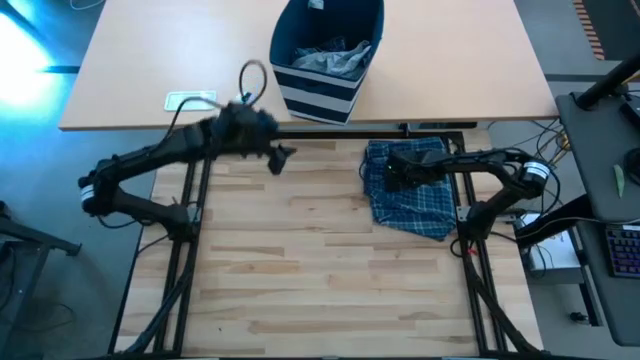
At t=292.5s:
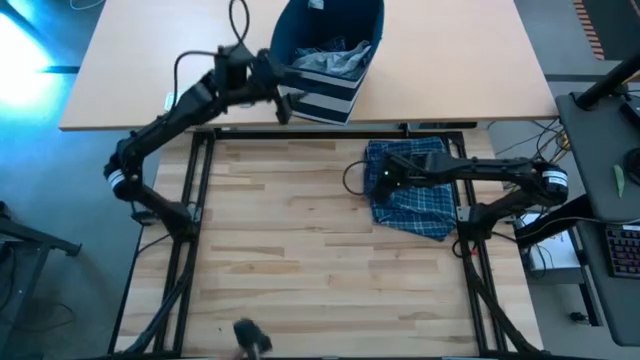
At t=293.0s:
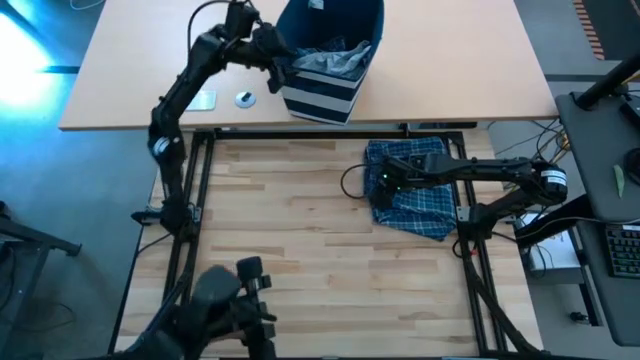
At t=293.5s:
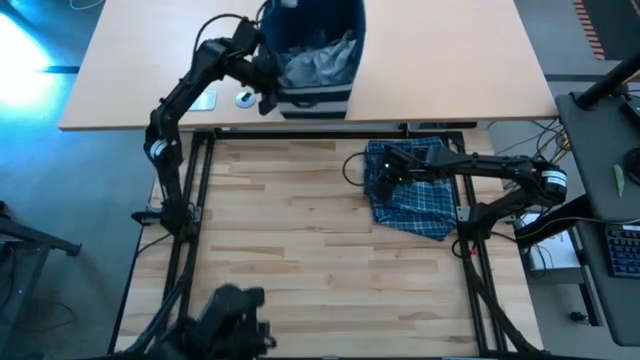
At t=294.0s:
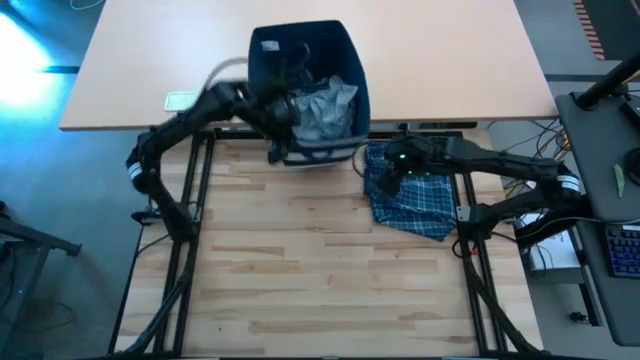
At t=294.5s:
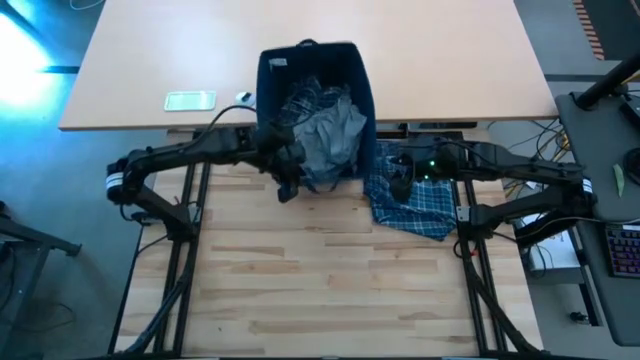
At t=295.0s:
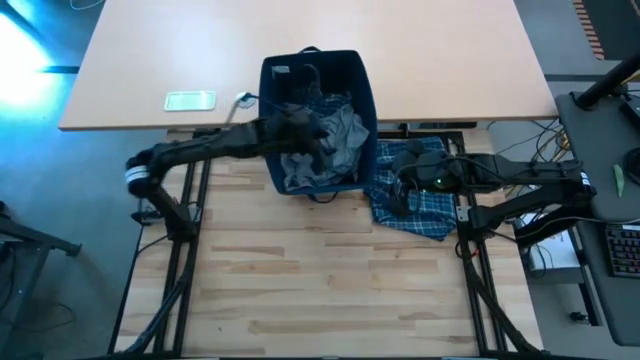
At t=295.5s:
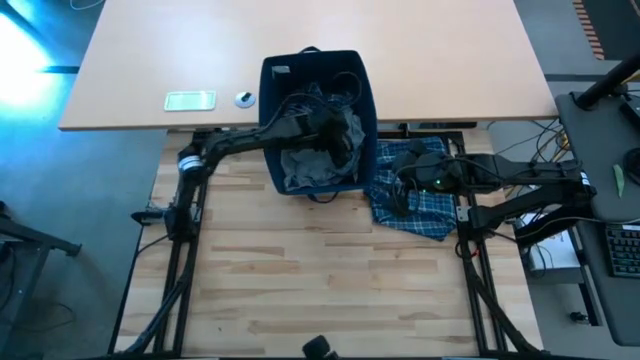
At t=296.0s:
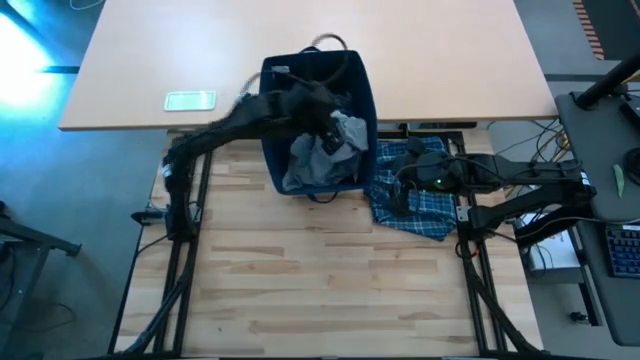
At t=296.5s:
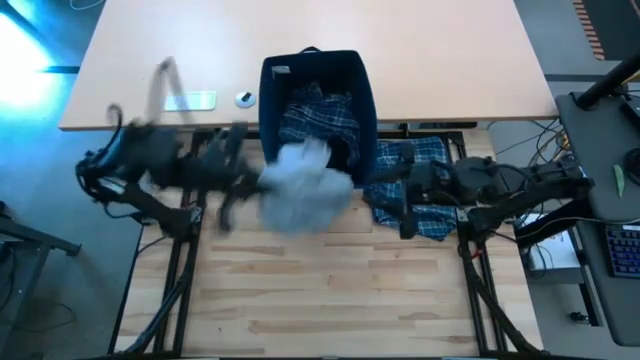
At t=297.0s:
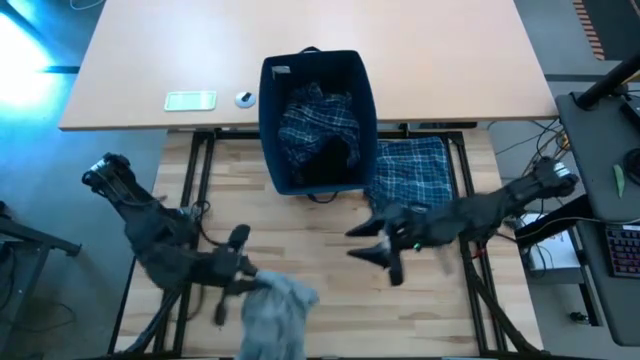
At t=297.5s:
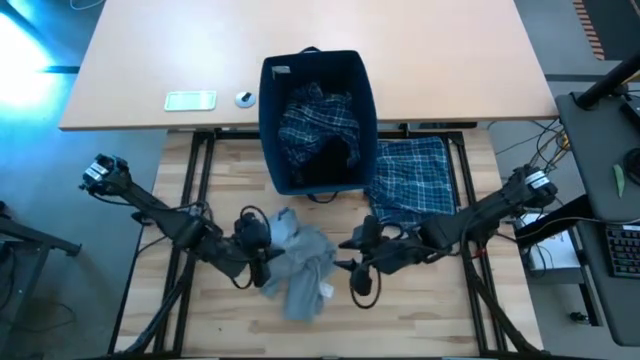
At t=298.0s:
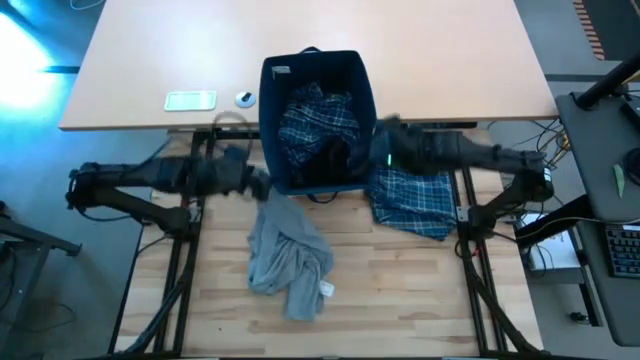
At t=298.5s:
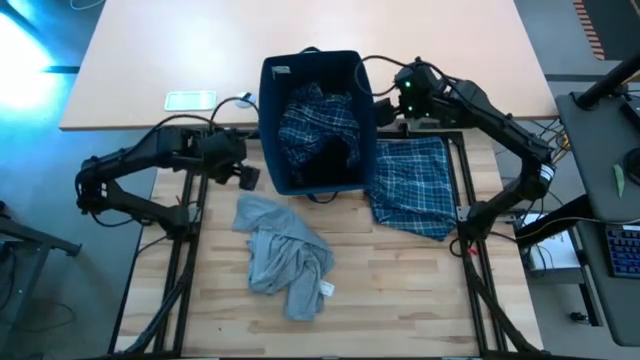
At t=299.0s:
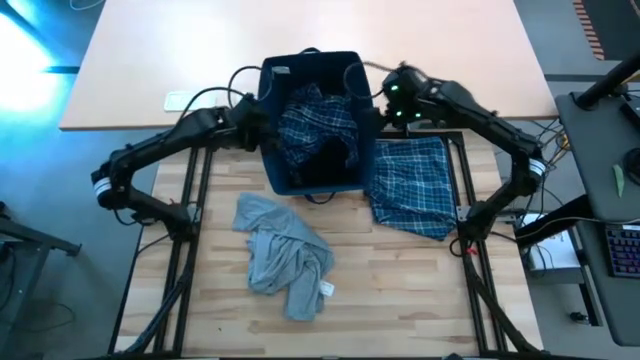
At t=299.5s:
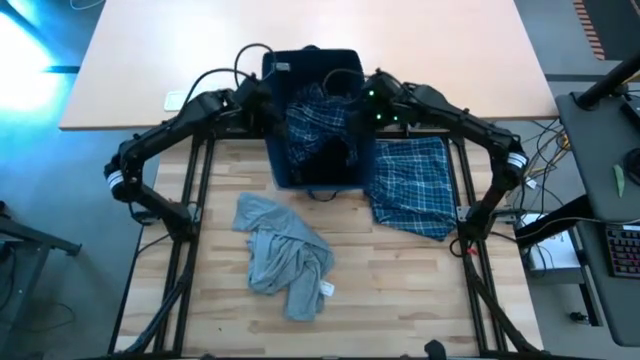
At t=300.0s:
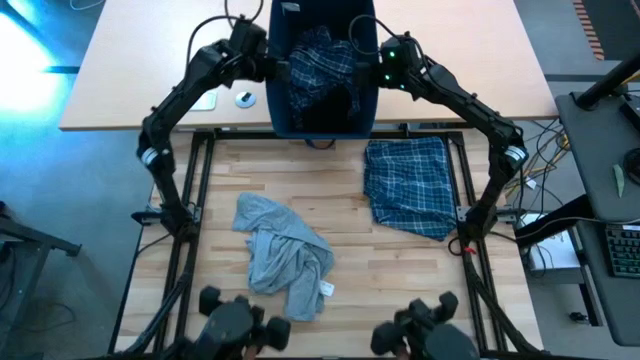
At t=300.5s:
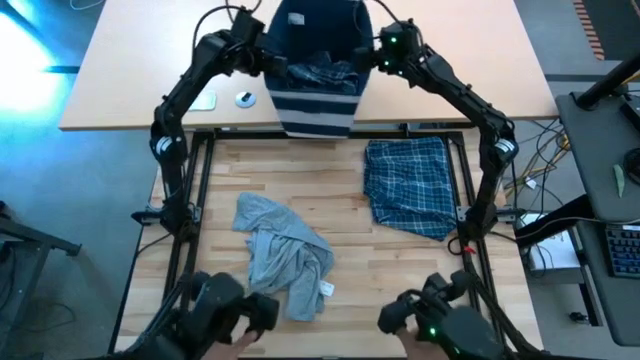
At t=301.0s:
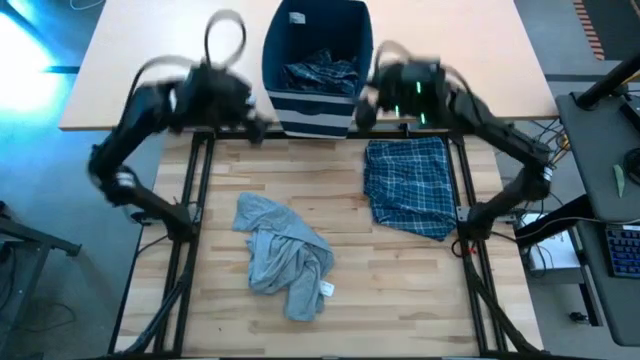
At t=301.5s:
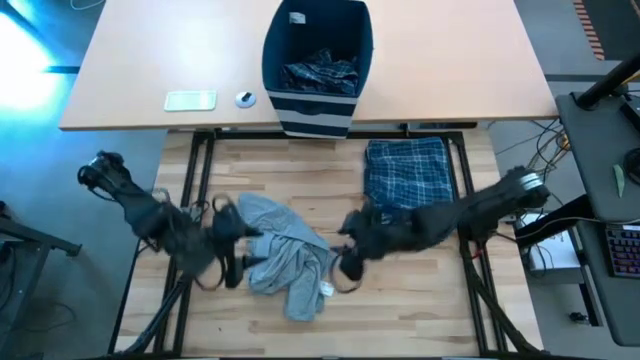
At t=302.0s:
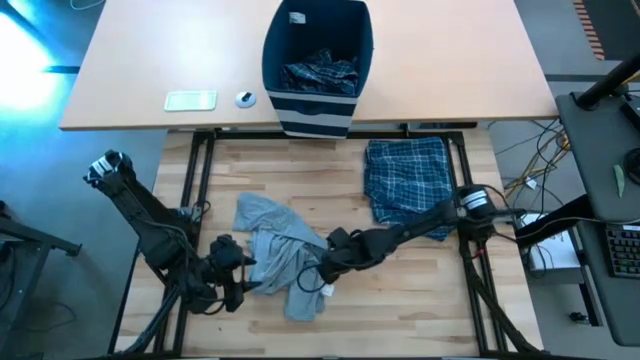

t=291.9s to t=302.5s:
Task: Fold Laundry from Bin
Remove the gray shirt from the blue laundry bin

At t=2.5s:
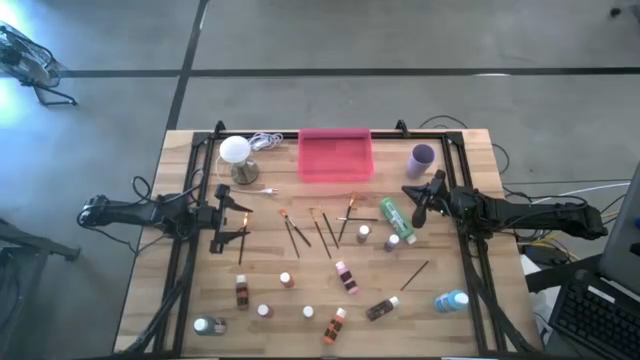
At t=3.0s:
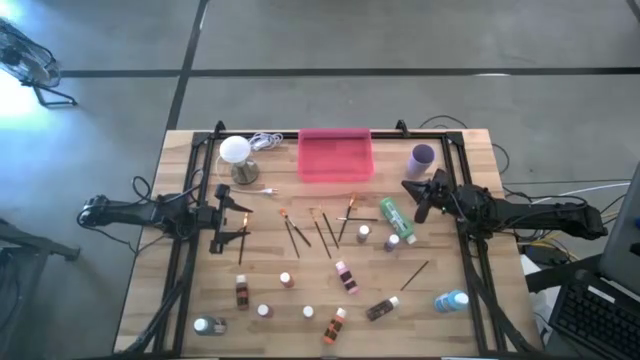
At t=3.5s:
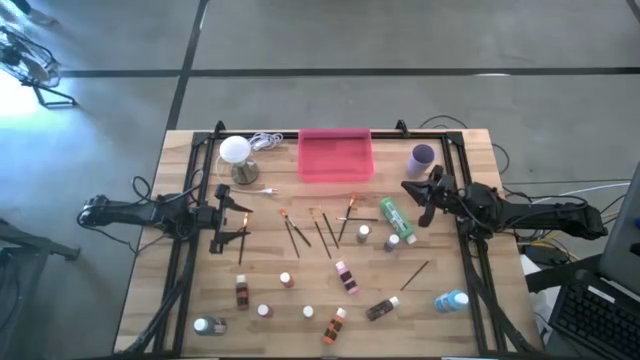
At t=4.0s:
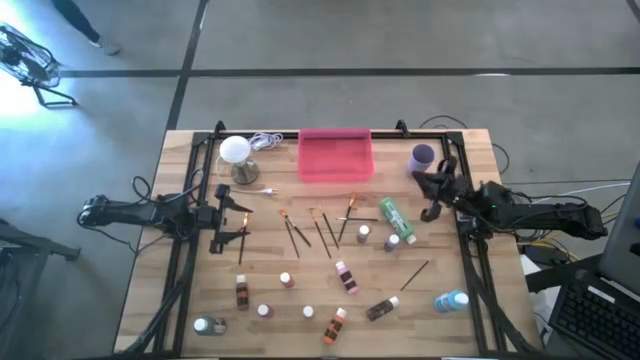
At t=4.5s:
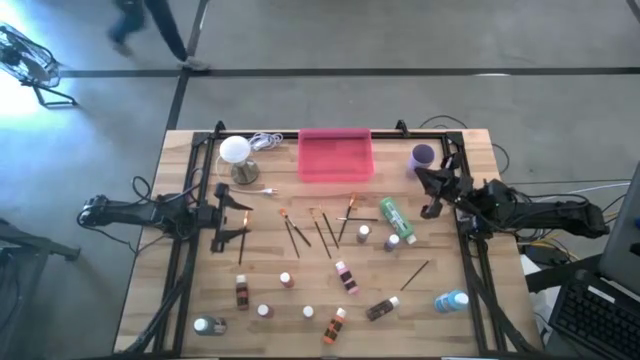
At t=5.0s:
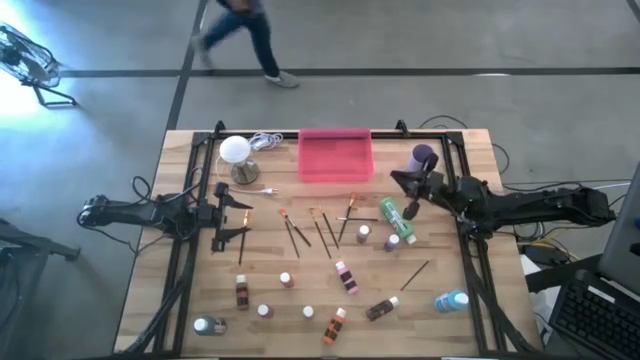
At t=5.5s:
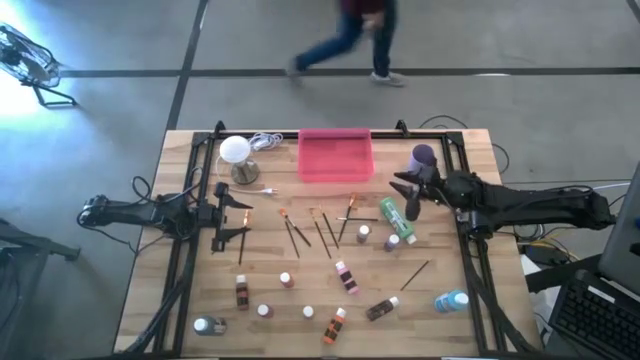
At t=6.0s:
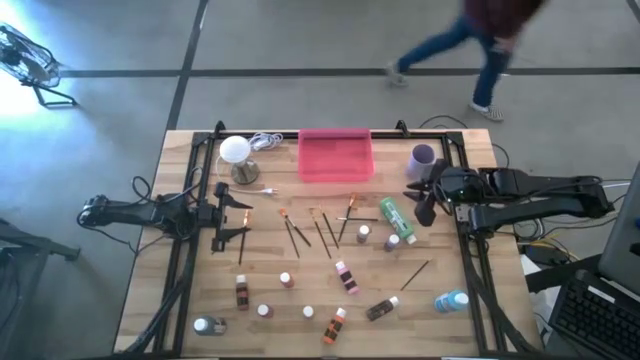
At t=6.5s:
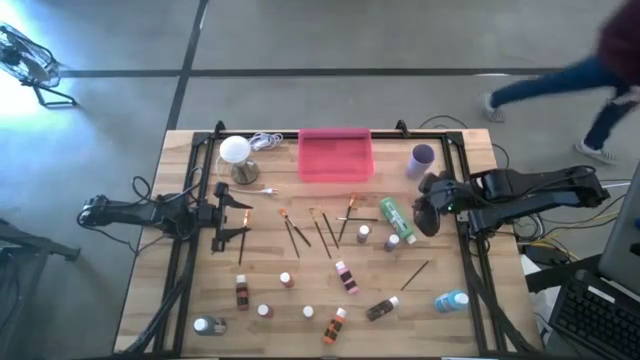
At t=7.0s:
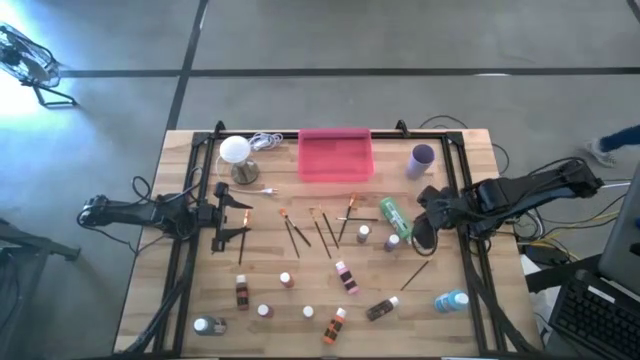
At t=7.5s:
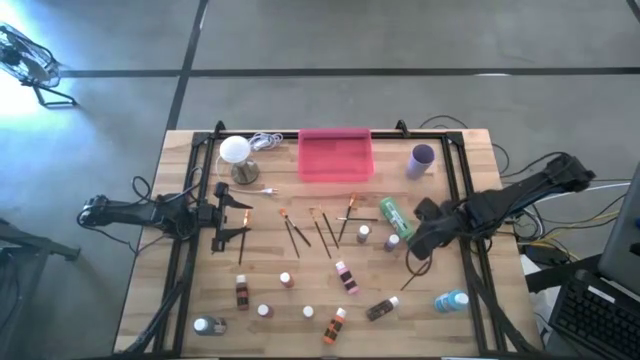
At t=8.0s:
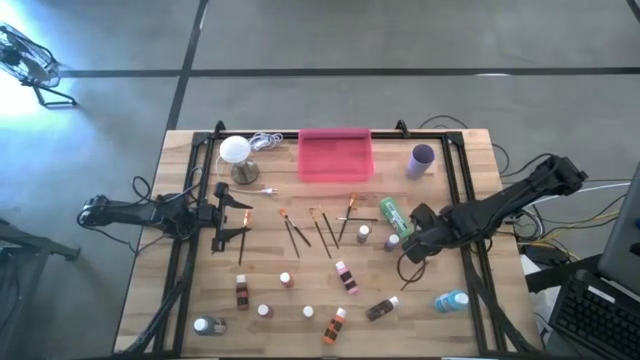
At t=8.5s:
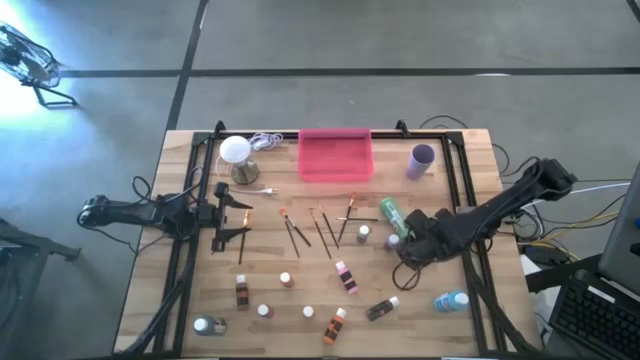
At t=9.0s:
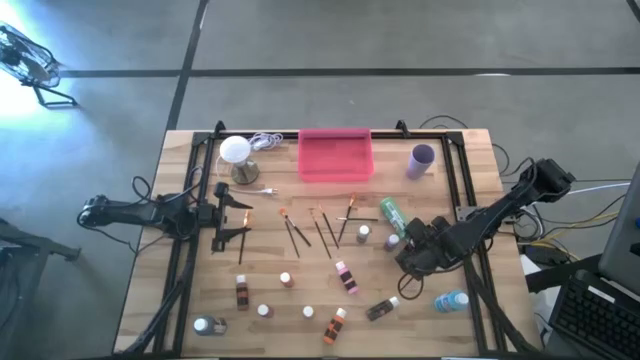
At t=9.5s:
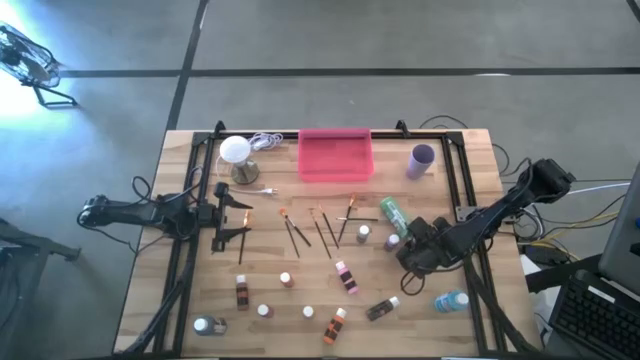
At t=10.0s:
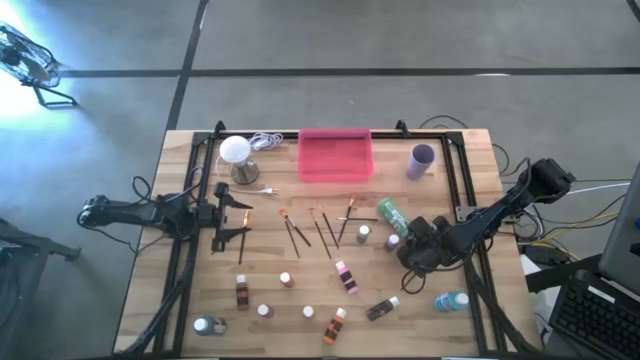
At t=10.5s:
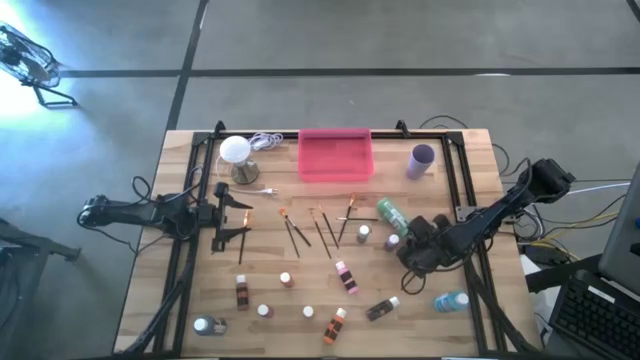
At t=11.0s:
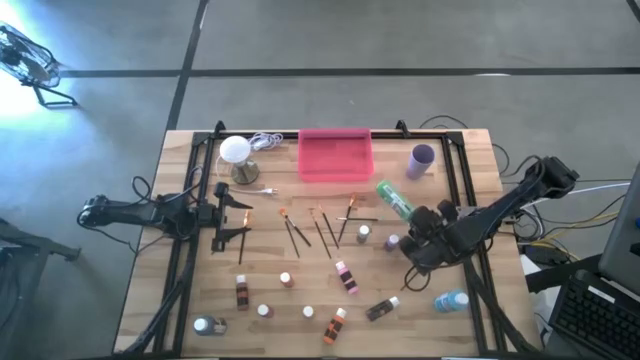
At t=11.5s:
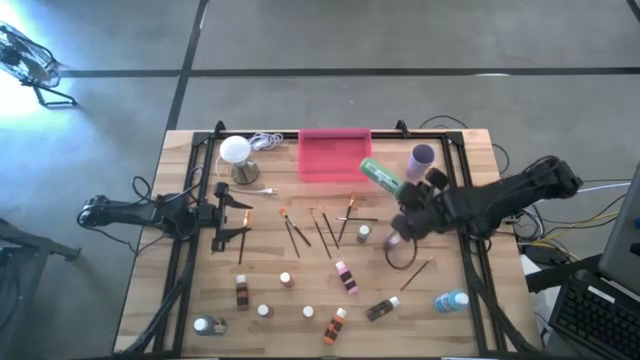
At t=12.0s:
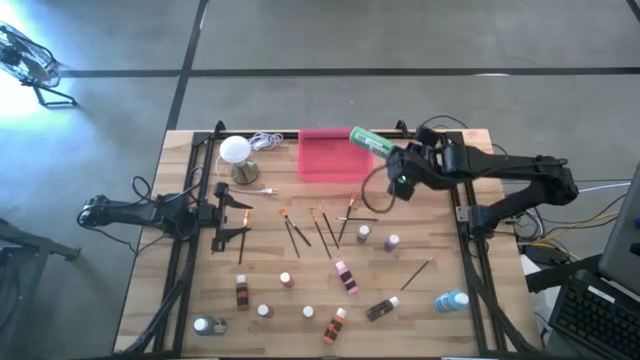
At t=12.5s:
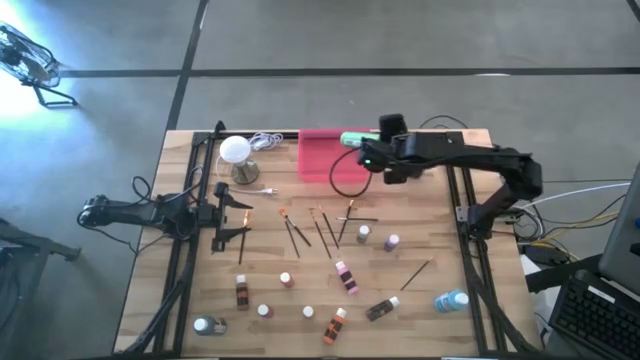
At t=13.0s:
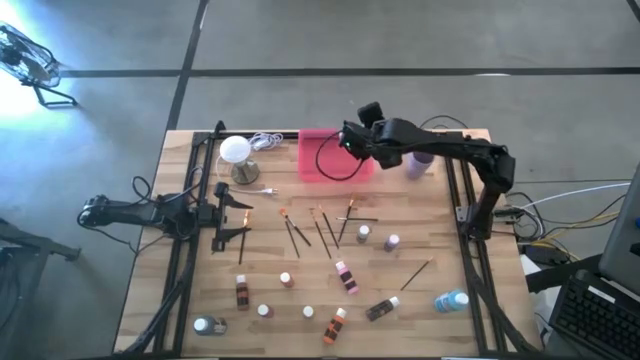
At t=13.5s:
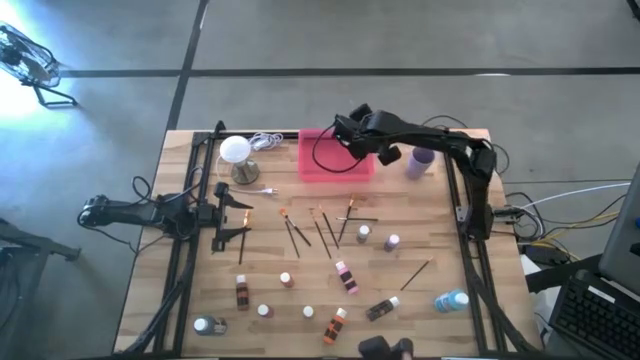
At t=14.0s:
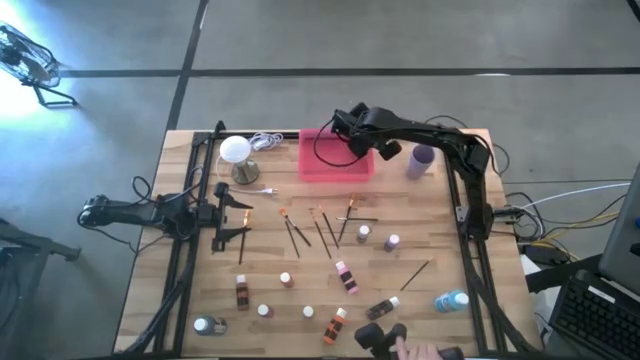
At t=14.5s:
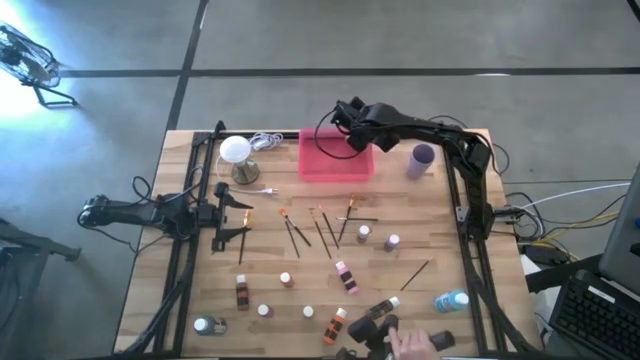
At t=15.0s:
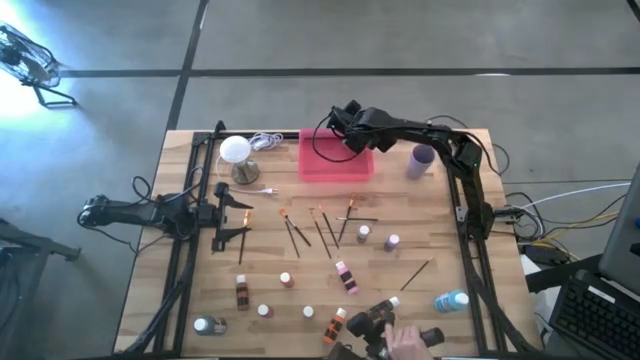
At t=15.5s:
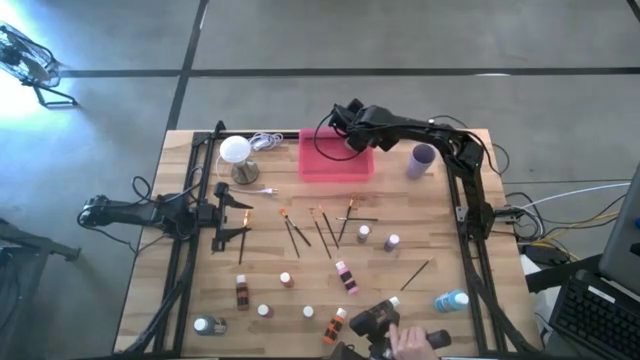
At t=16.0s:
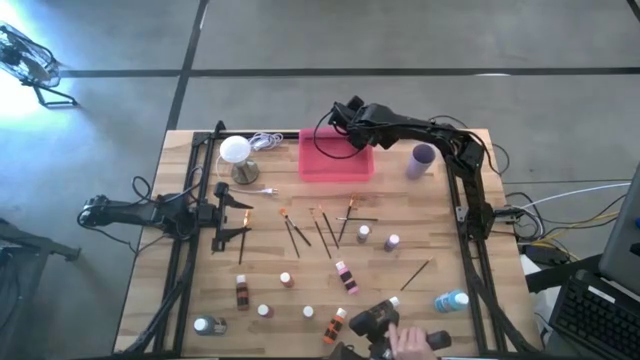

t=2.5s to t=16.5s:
Task: Pick & Place Paint Supplies
Put the green paint bottle into the pink bin
